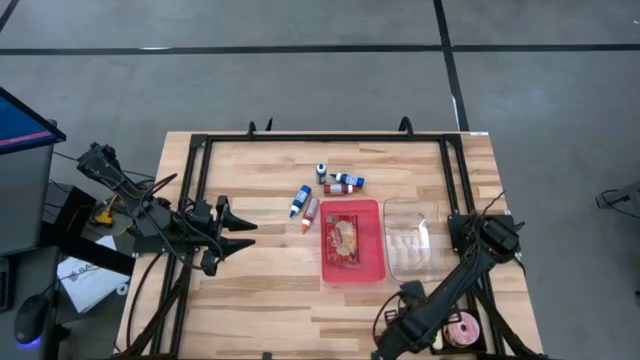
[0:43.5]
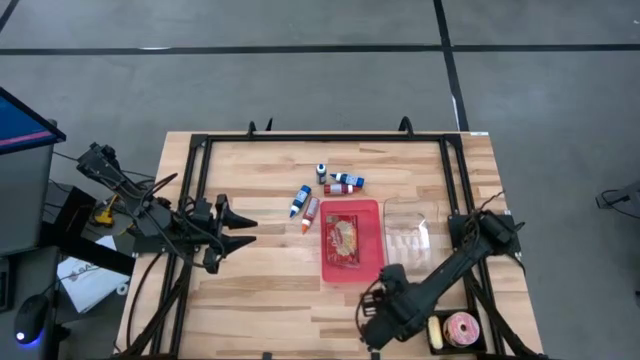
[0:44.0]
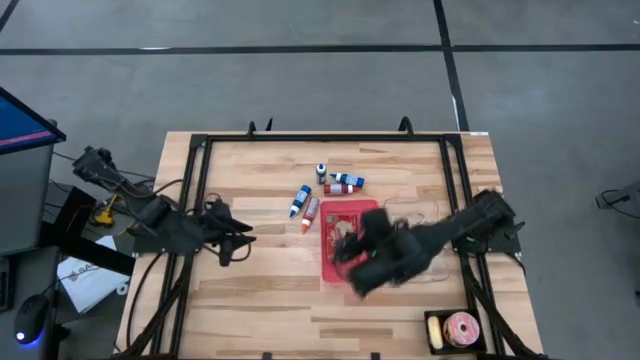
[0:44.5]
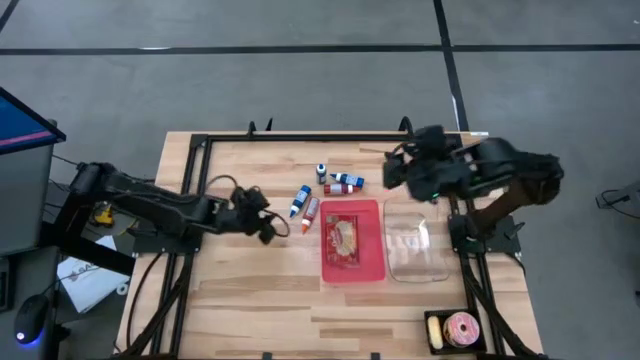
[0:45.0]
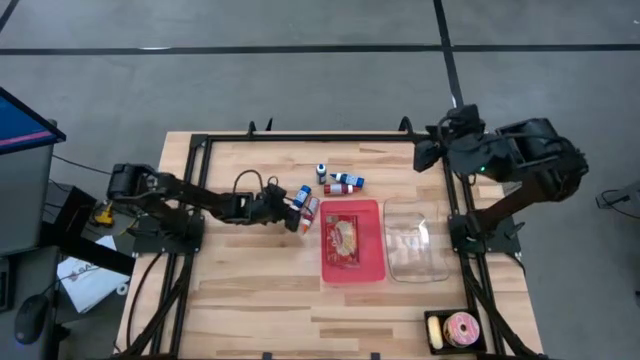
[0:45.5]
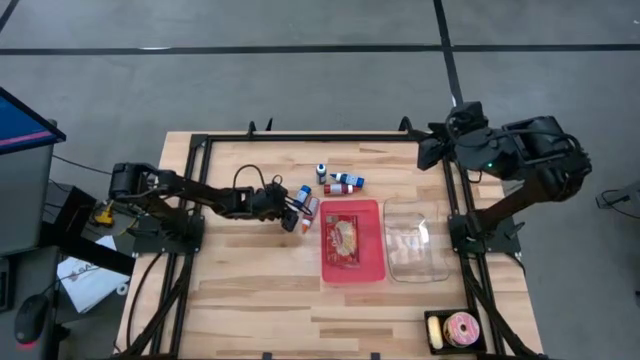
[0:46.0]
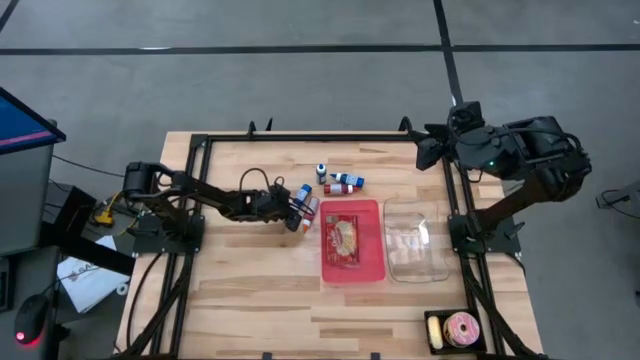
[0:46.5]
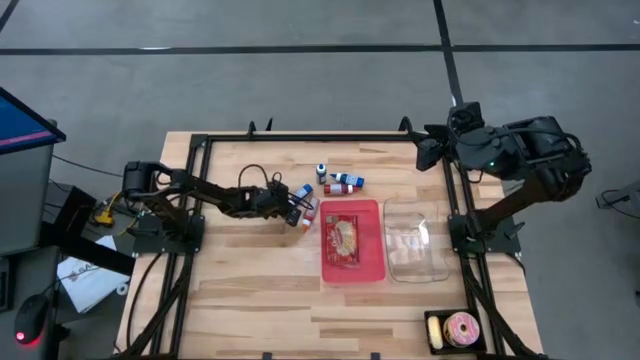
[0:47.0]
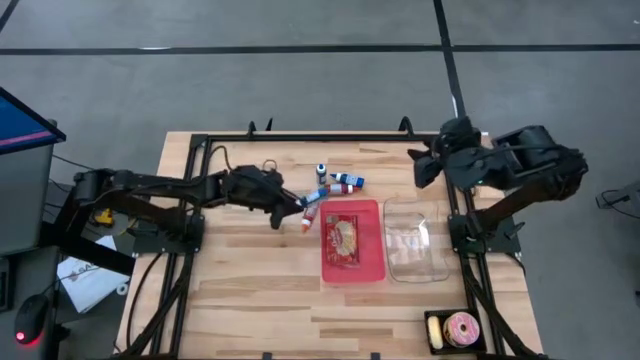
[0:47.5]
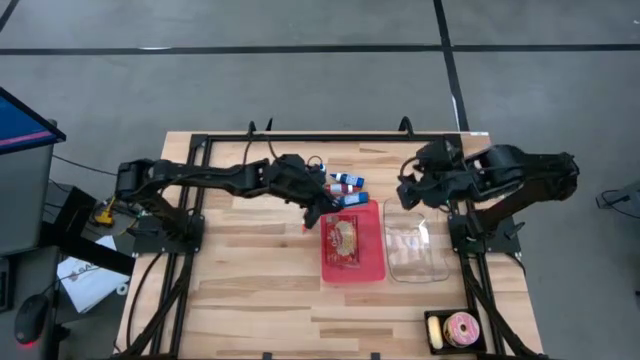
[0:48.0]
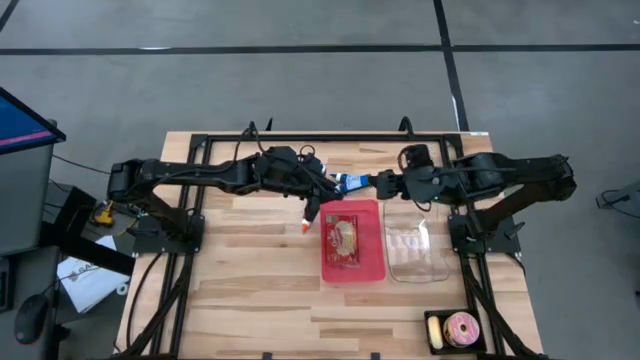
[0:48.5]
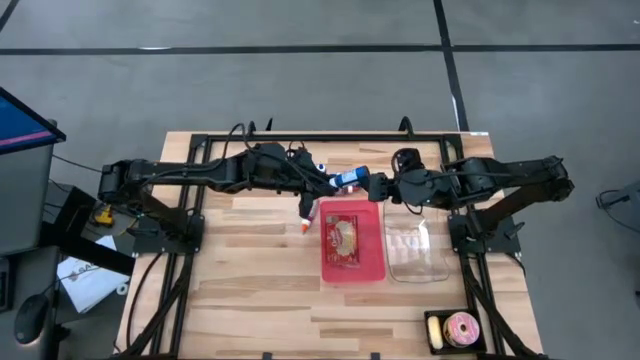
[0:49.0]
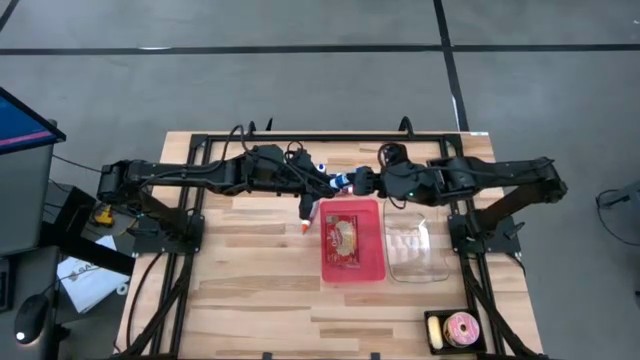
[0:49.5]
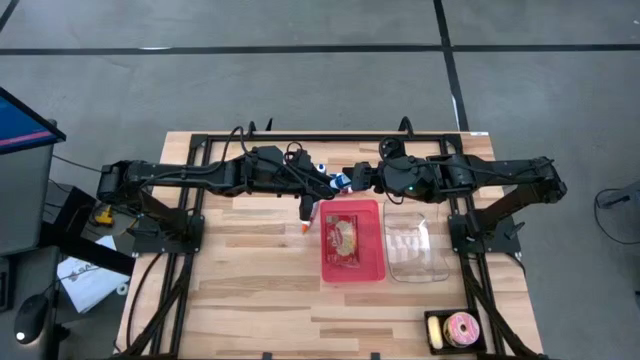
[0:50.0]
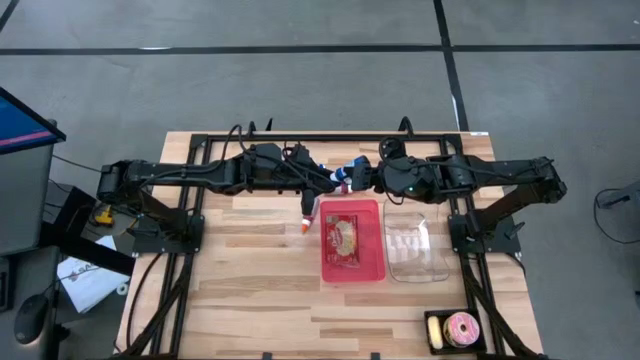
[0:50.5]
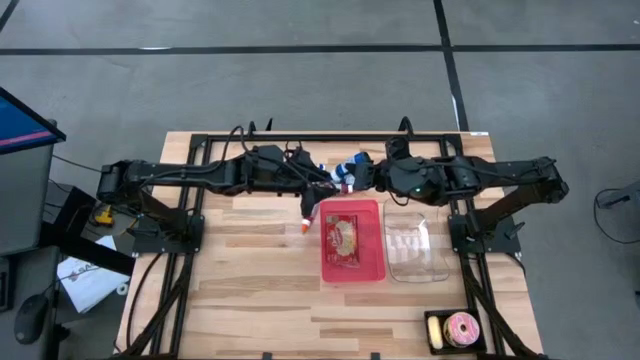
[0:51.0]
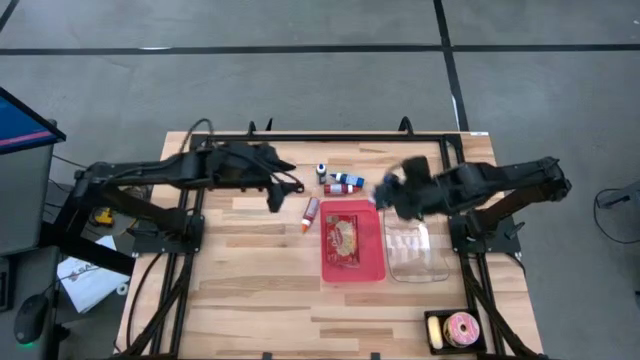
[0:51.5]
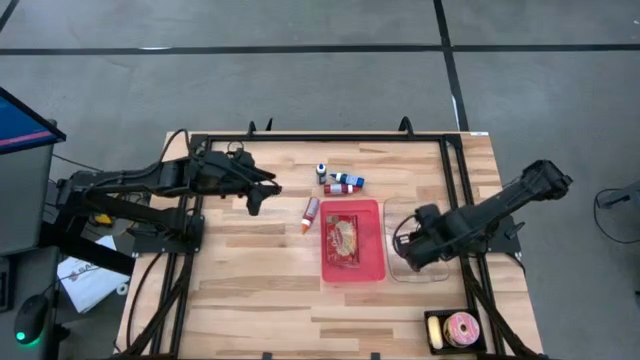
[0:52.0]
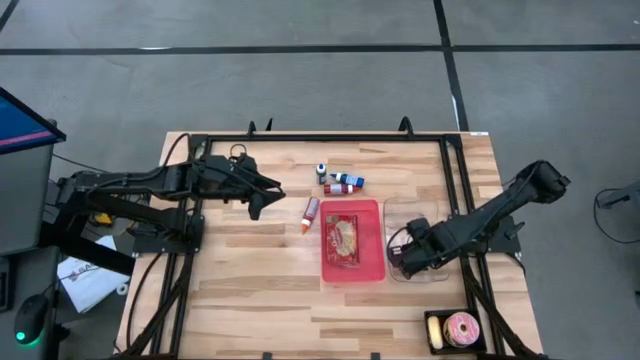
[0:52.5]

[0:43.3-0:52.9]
Put the bottom blue food coloring bottle into the transparent bin

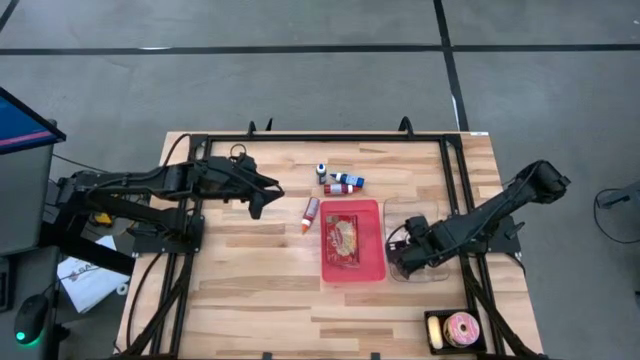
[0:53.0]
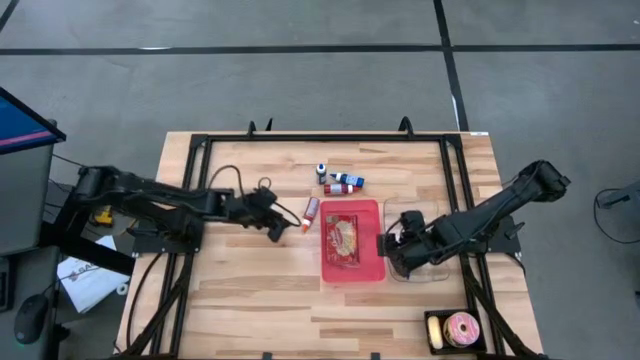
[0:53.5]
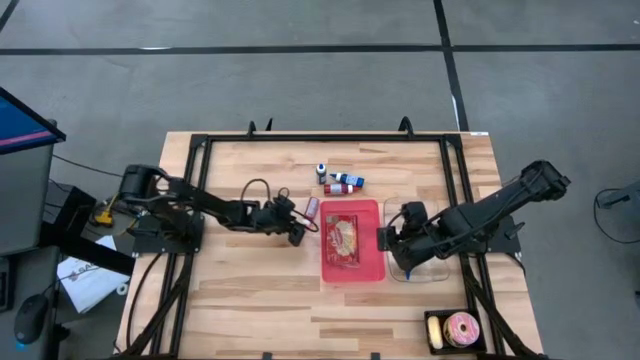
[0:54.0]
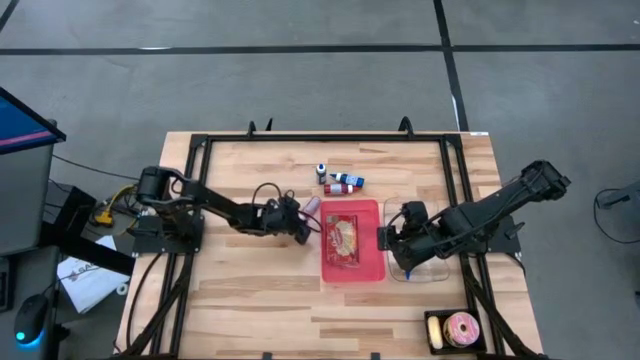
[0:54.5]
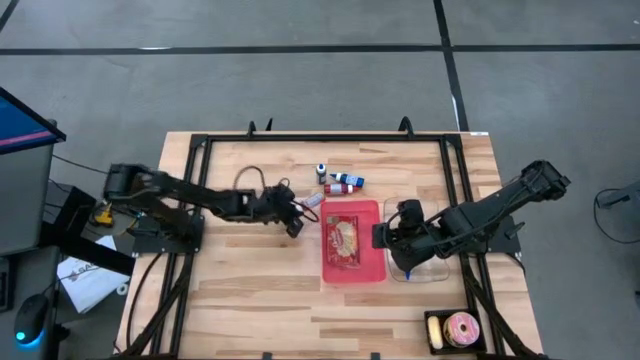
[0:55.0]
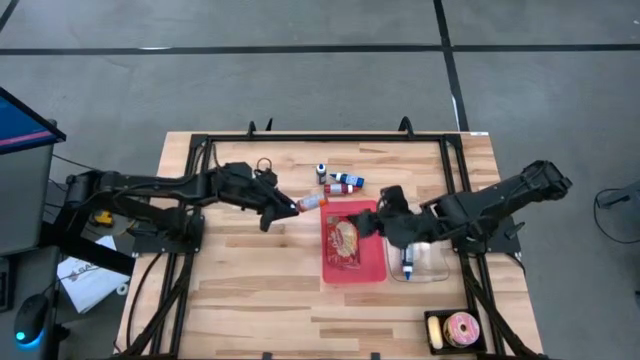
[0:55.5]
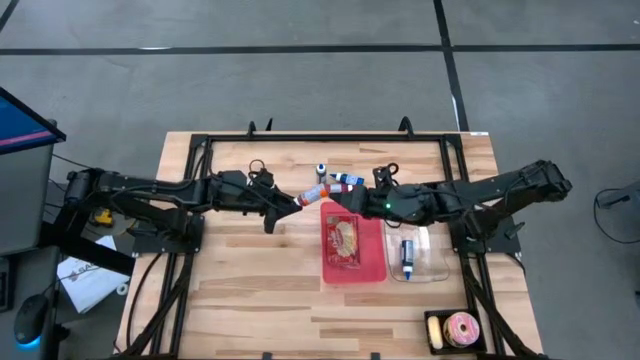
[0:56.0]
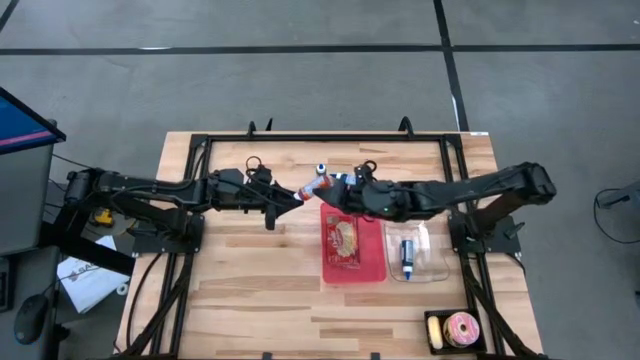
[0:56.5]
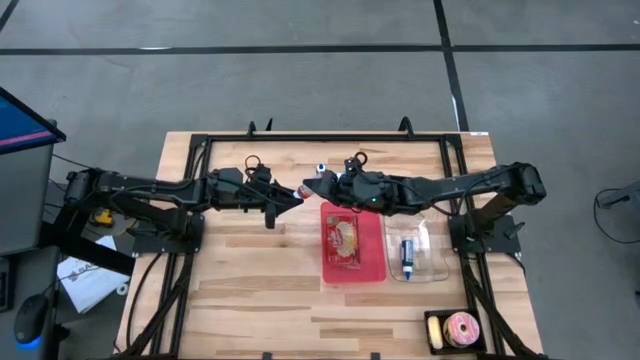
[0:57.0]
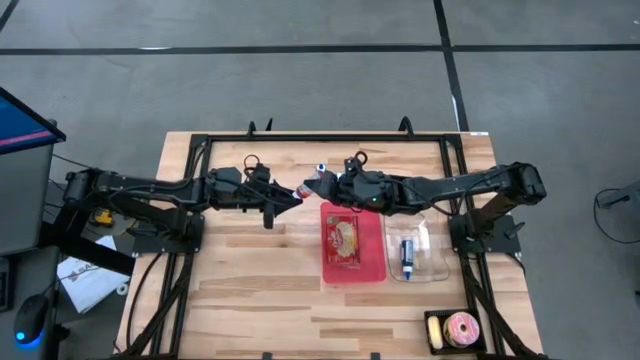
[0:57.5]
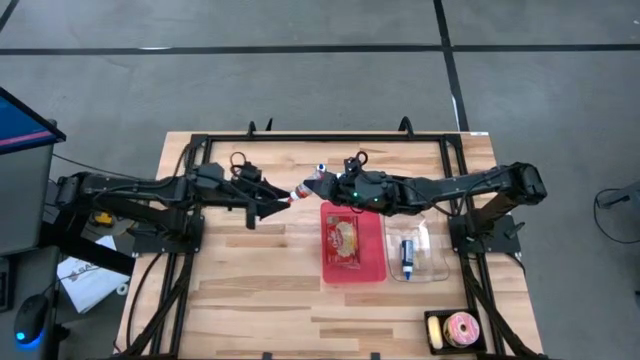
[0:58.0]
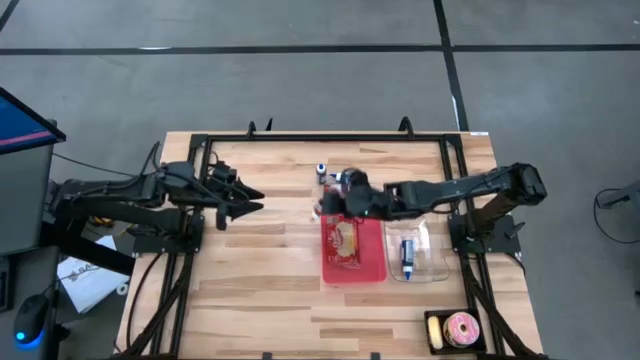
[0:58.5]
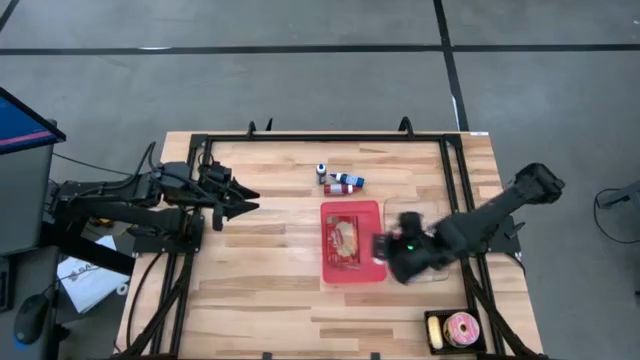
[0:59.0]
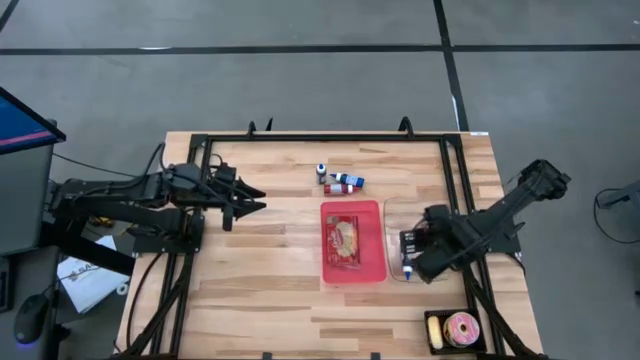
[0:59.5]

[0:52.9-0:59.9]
Put the bottom red food coloring bottle into the transparent bin

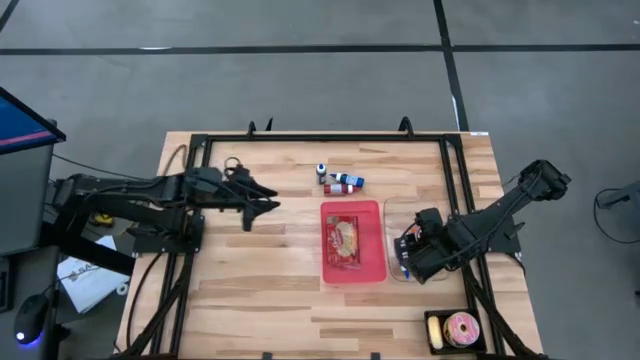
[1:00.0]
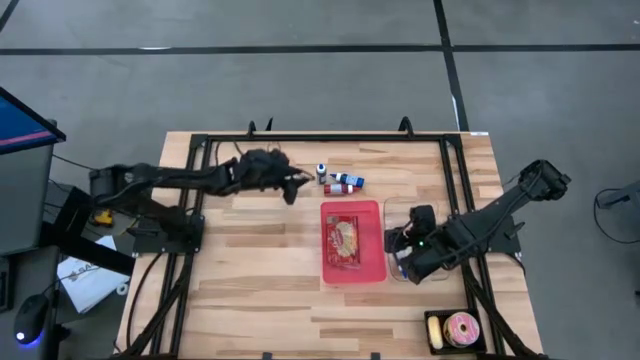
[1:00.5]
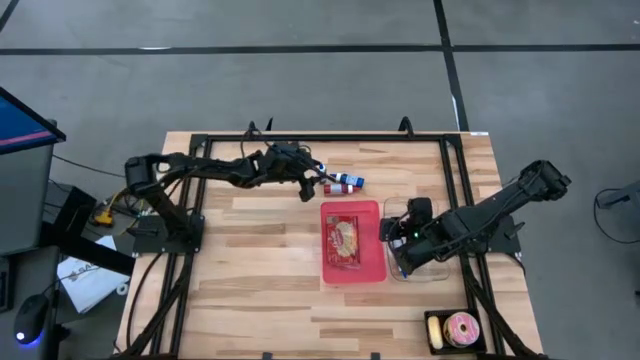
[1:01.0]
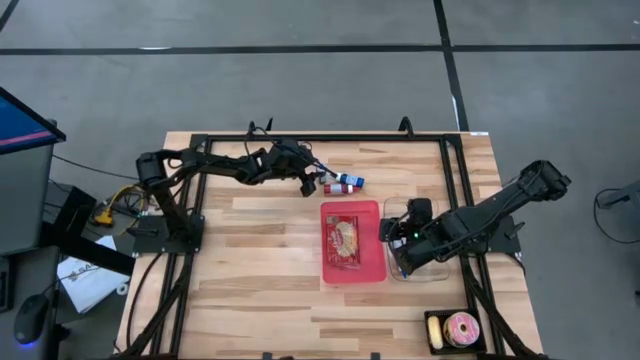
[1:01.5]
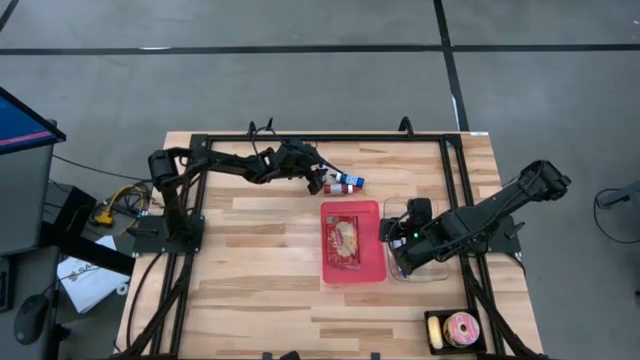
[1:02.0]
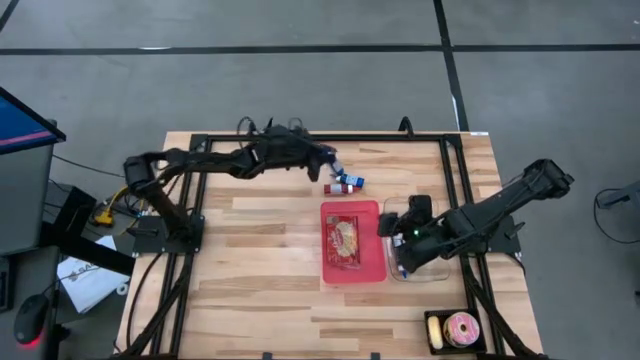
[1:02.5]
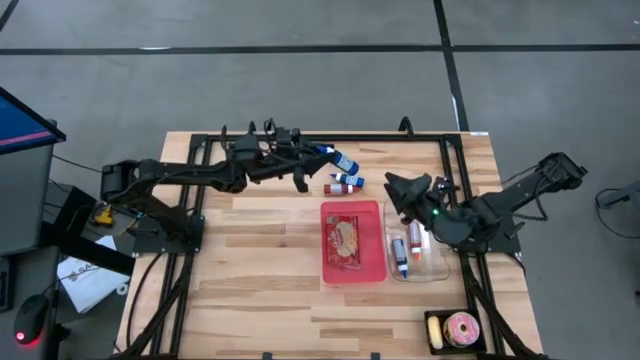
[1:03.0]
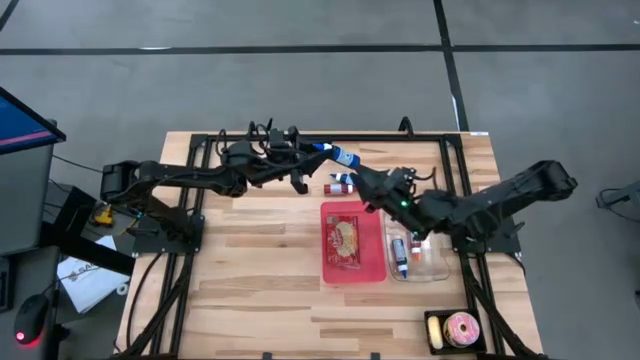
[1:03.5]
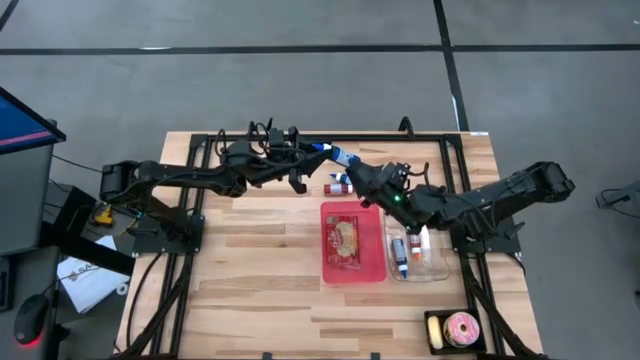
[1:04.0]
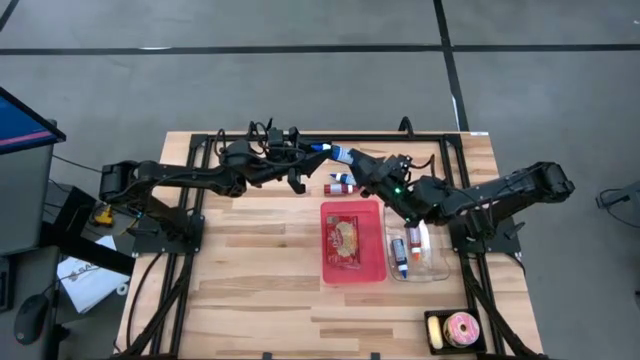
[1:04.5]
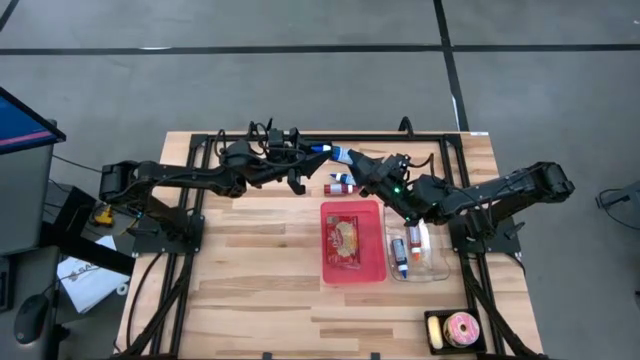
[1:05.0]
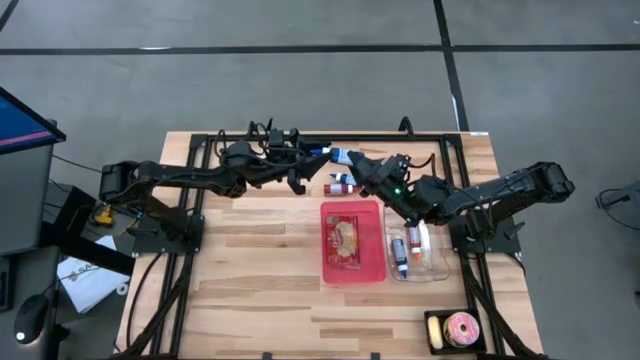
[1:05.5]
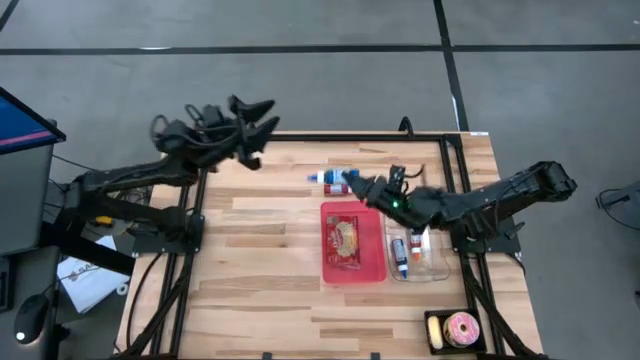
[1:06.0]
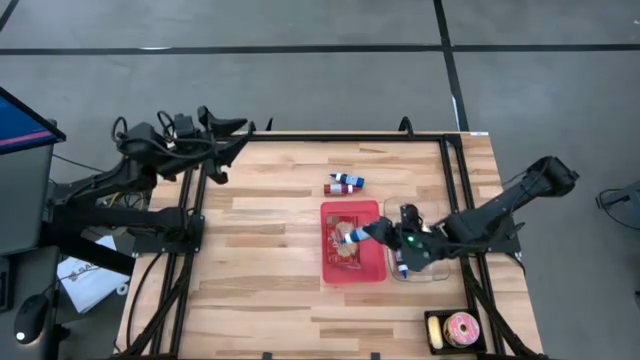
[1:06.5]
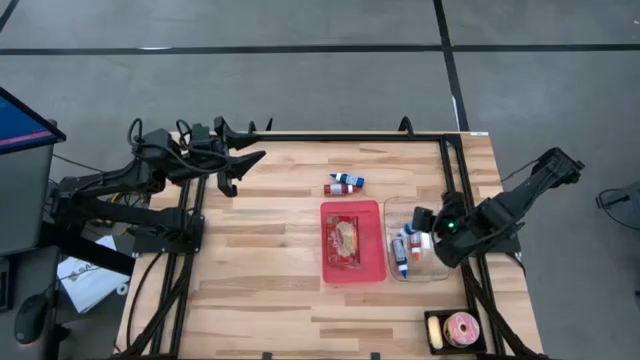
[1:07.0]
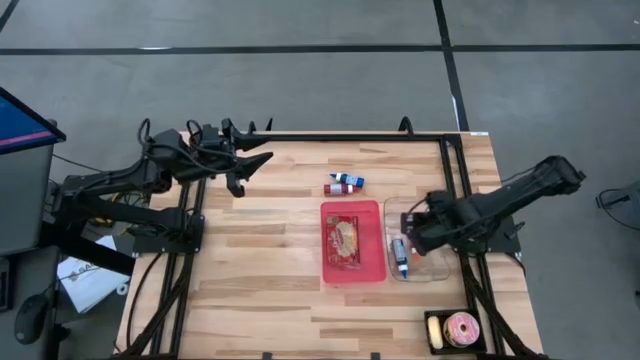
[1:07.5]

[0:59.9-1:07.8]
Put the left blue food coloring bottle into the transparent bin
